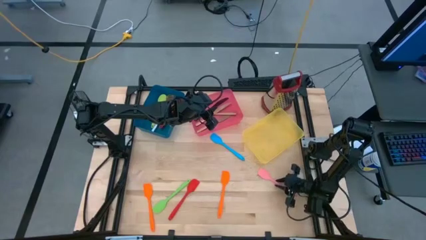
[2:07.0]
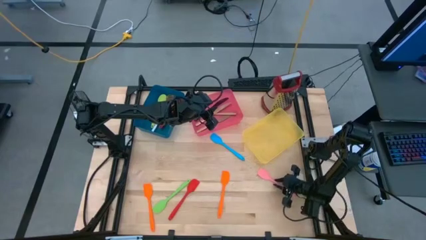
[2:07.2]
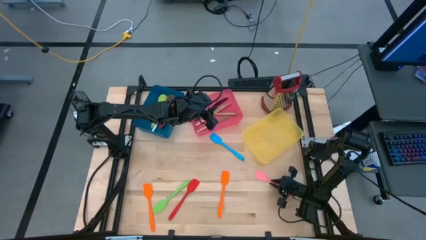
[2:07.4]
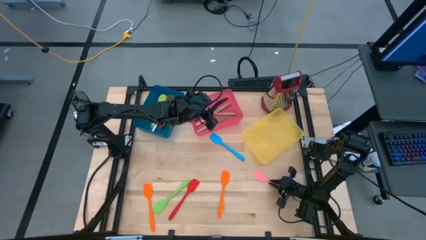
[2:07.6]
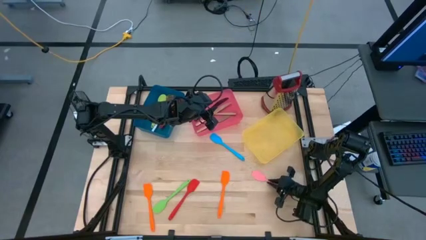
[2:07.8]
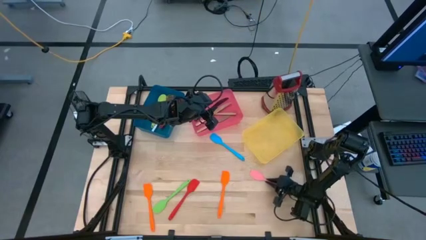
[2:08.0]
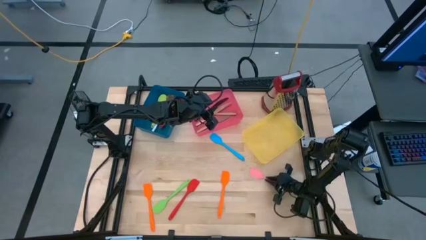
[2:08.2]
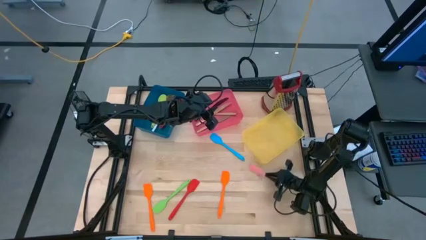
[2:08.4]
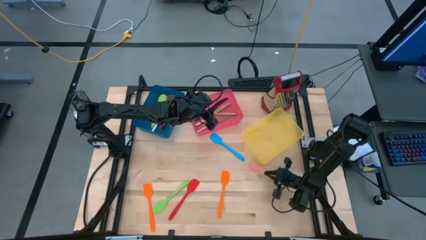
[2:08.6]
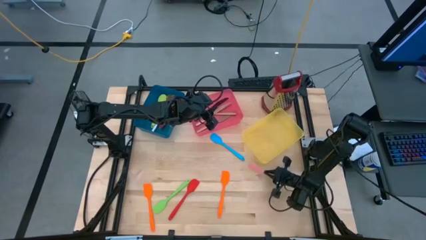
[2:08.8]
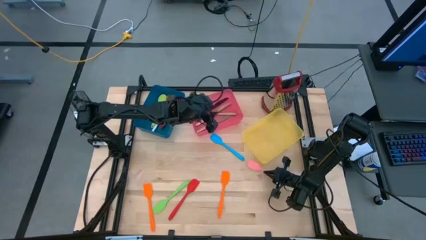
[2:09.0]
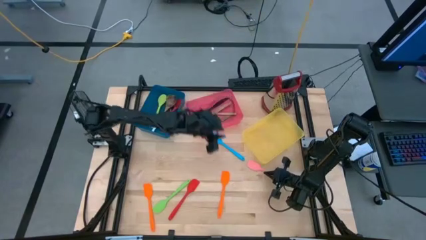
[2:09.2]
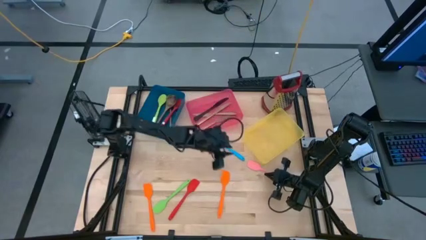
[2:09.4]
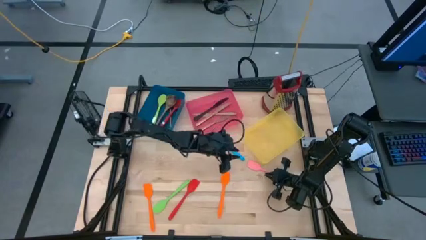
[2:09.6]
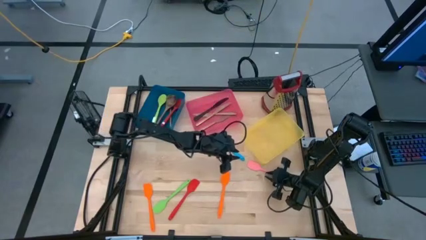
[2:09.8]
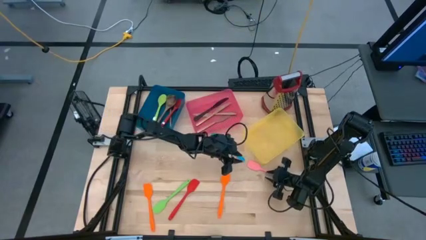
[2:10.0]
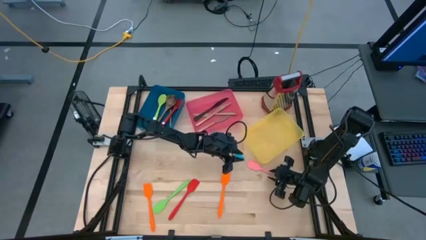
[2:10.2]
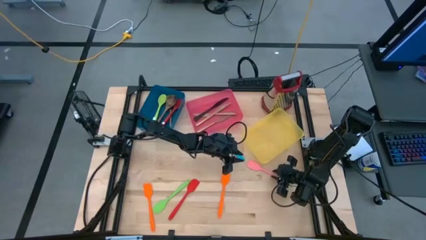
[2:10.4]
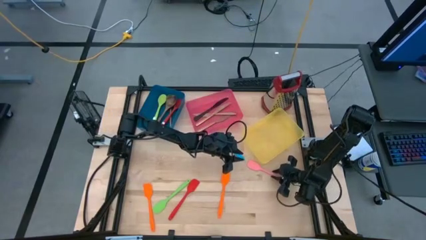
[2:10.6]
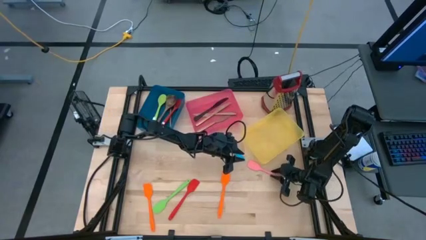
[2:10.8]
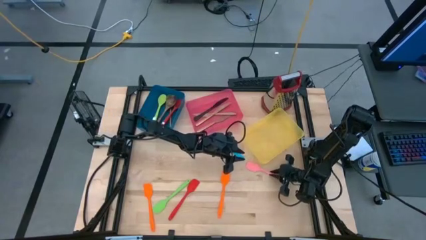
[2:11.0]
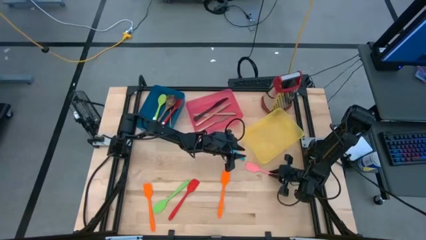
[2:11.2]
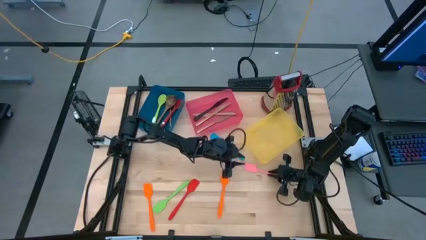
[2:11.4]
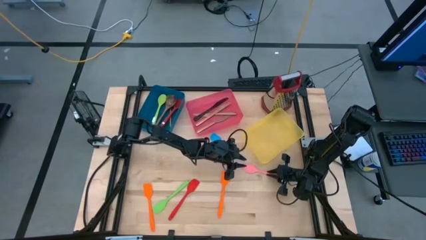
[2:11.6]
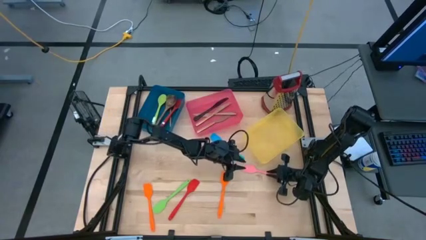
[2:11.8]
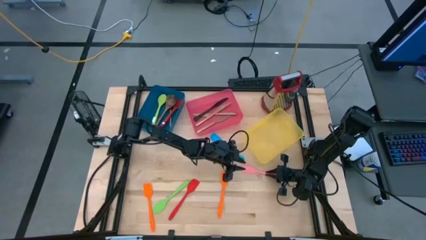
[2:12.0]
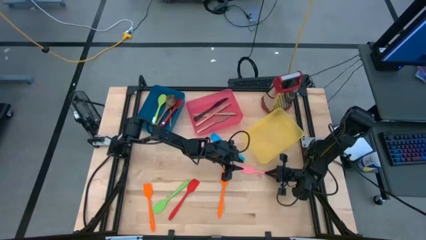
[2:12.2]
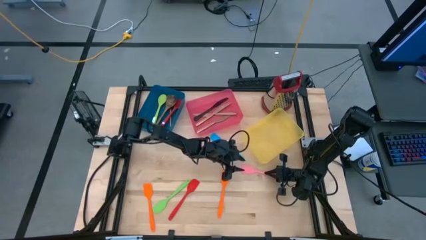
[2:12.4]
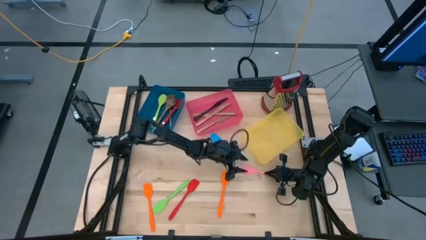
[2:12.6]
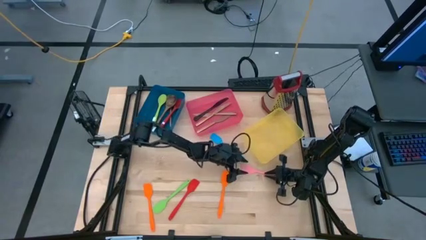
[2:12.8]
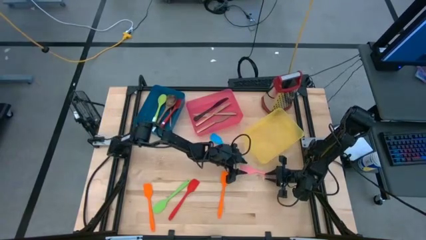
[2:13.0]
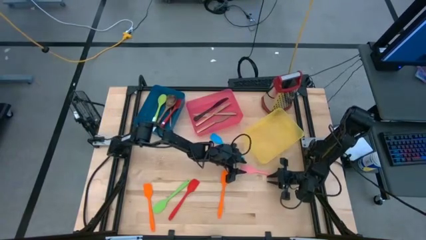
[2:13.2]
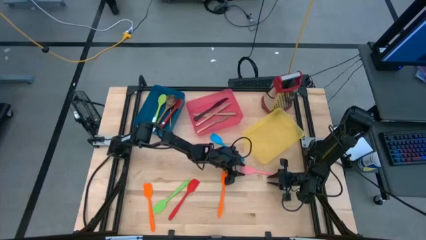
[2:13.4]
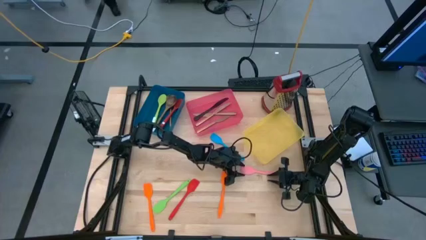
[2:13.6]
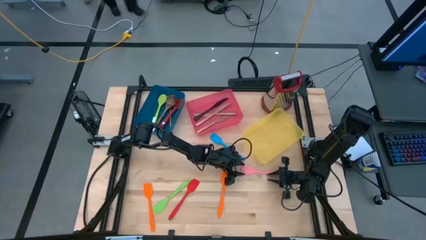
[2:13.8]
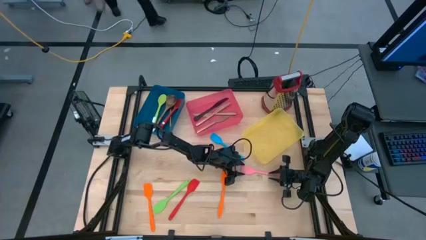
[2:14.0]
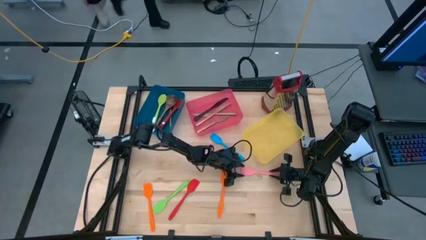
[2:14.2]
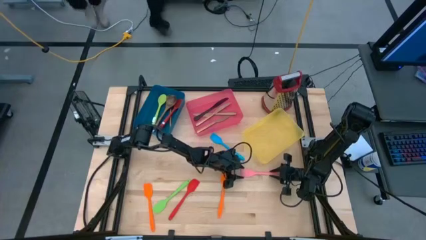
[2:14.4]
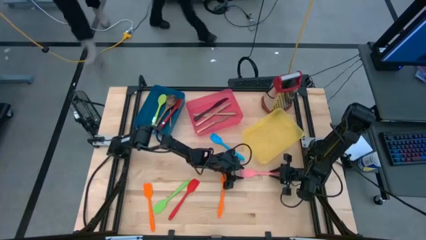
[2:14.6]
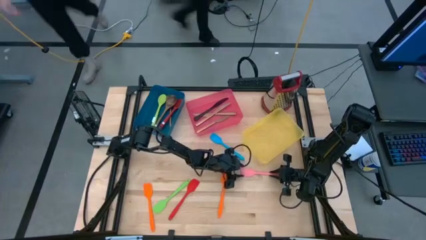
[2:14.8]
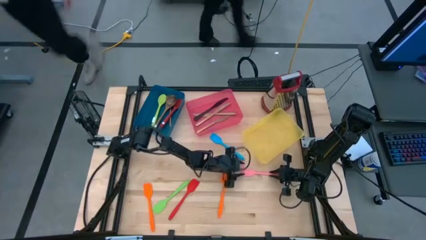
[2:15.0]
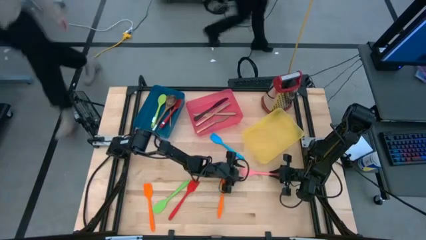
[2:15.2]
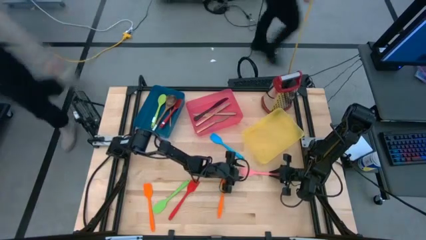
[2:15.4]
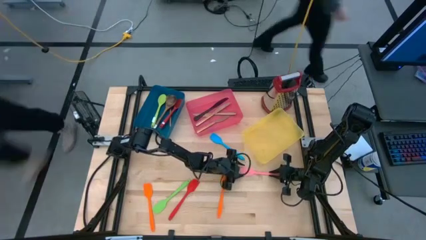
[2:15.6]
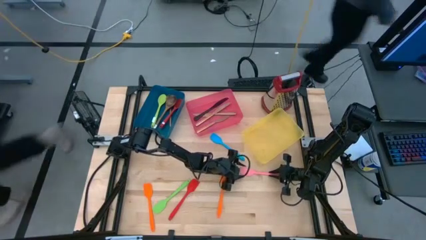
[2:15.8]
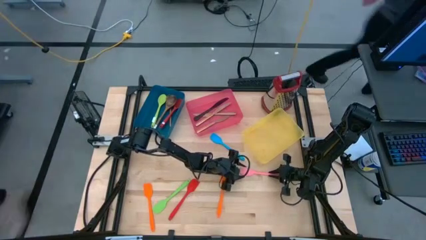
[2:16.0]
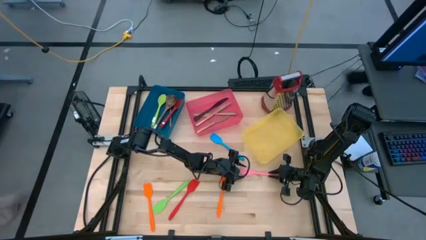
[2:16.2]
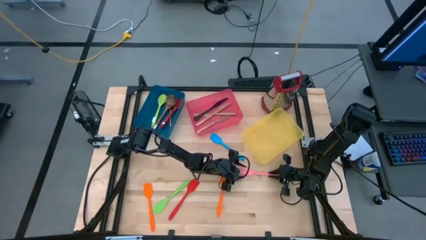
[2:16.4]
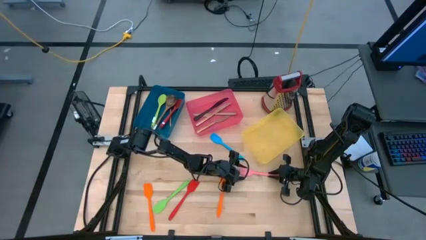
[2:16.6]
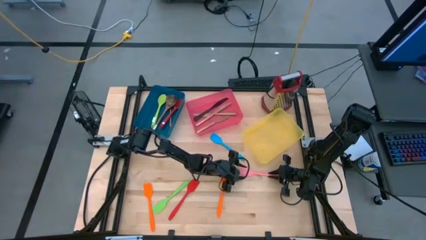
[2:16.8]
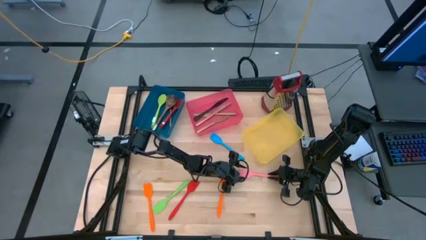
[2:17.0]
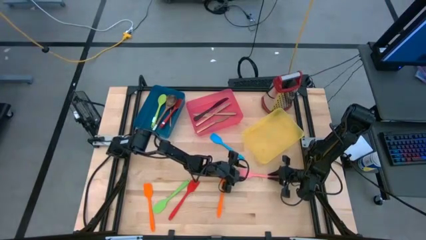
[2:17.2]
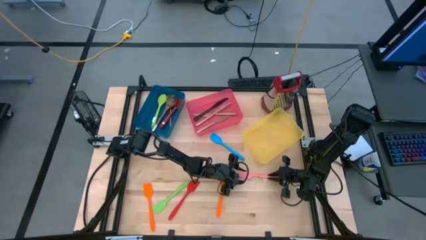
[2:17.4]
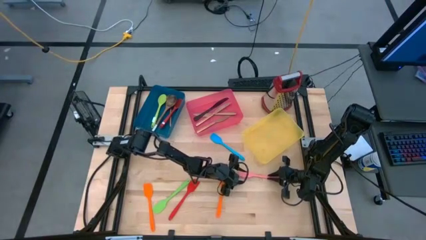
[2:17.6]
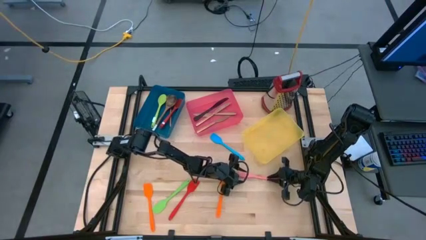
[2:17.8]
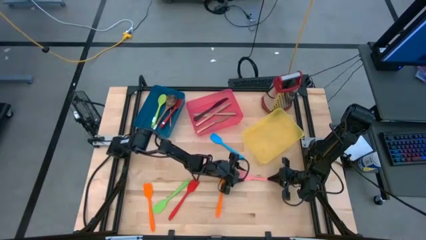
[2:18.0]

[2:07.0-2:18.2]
Task: Pick & Place Kitchen Items
Put the pink spatula into the yellow bin

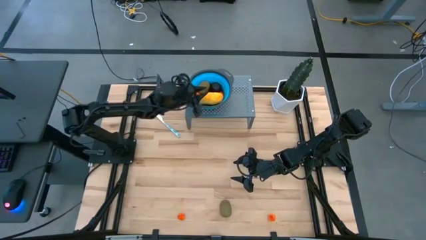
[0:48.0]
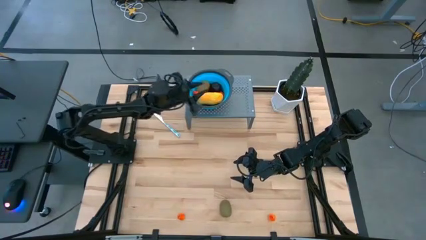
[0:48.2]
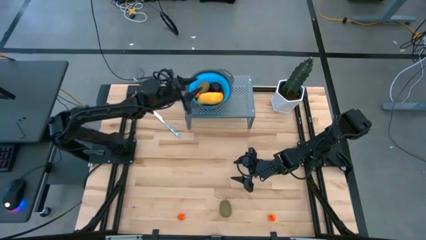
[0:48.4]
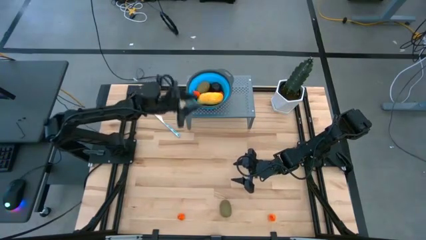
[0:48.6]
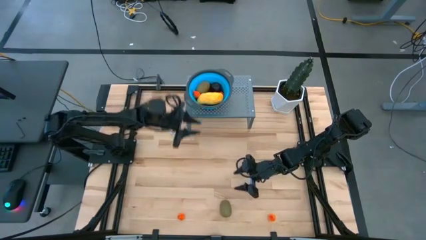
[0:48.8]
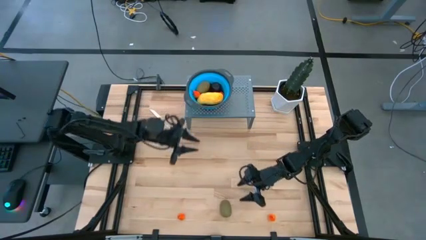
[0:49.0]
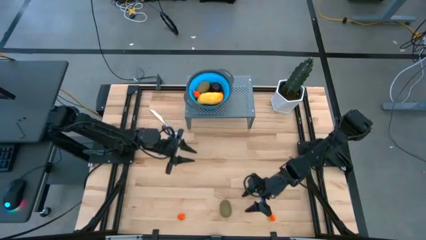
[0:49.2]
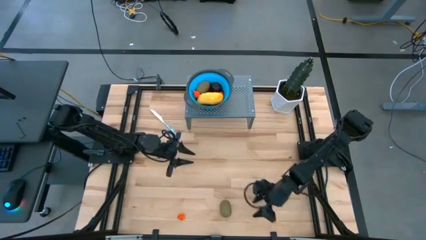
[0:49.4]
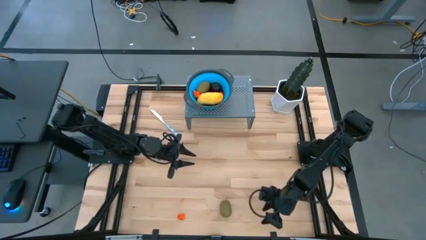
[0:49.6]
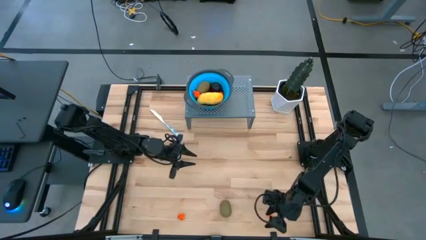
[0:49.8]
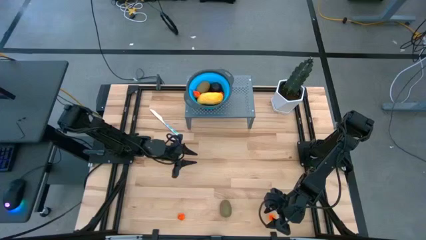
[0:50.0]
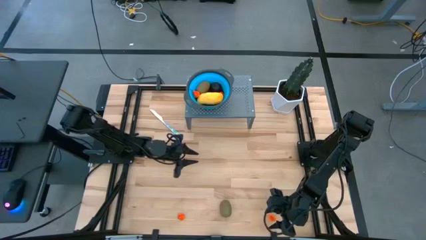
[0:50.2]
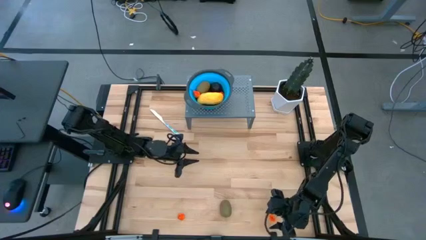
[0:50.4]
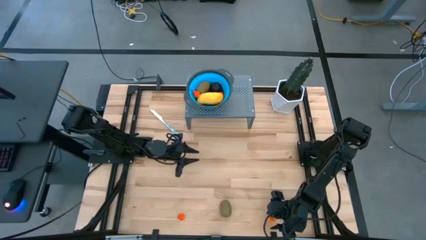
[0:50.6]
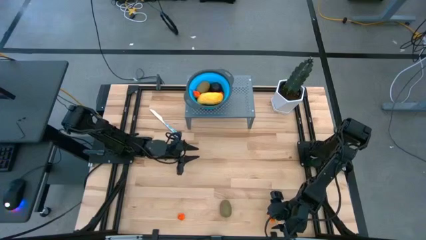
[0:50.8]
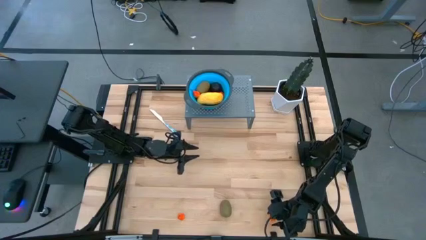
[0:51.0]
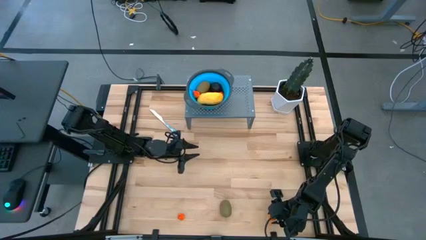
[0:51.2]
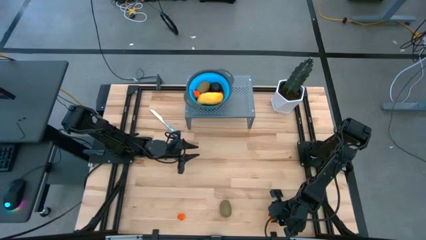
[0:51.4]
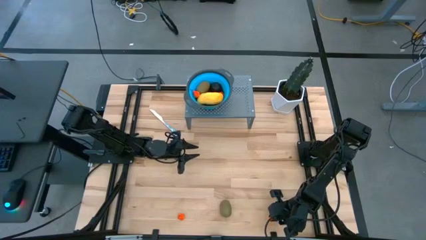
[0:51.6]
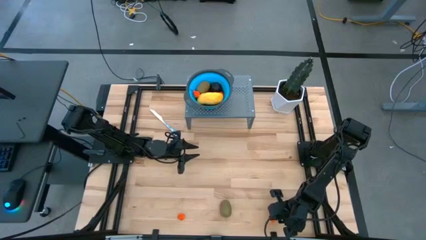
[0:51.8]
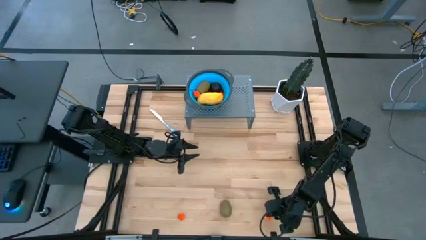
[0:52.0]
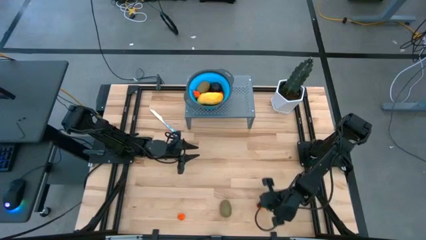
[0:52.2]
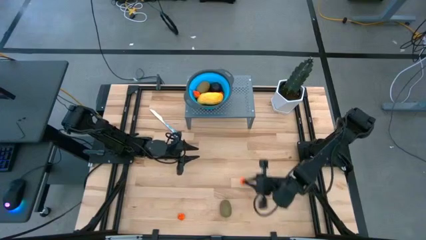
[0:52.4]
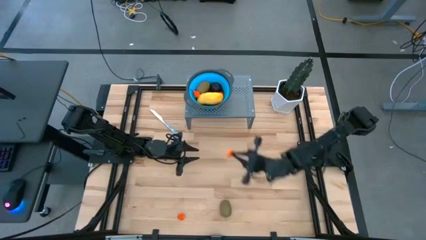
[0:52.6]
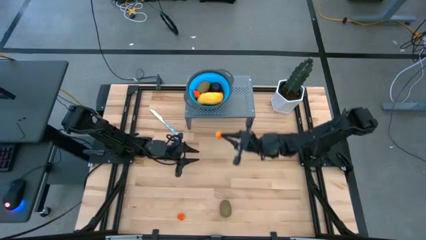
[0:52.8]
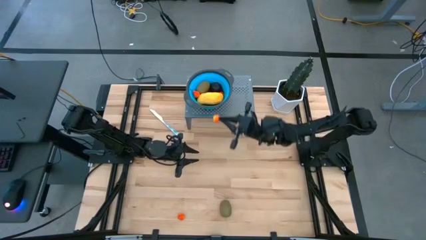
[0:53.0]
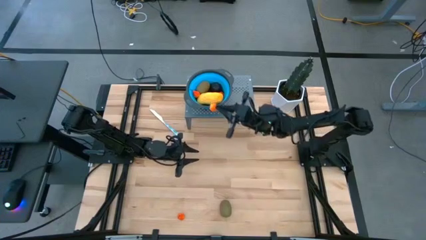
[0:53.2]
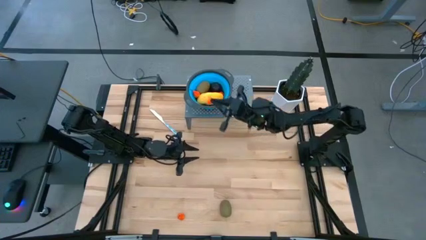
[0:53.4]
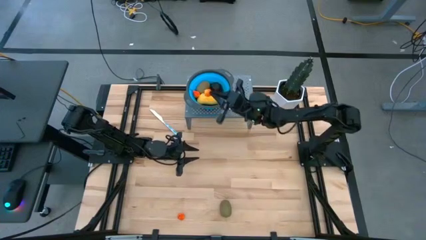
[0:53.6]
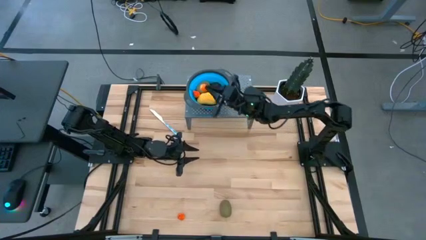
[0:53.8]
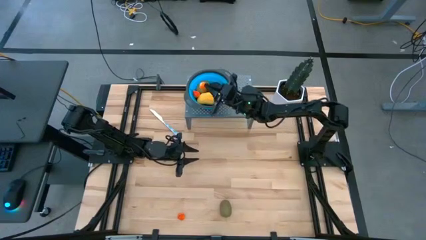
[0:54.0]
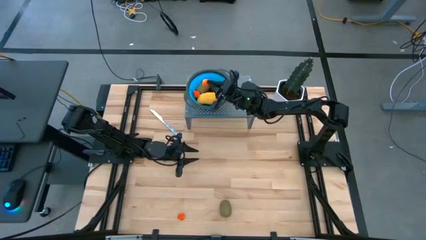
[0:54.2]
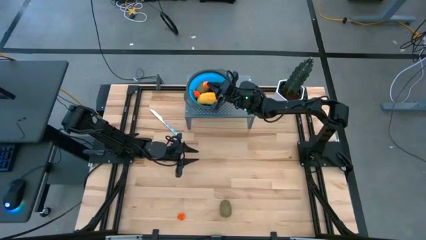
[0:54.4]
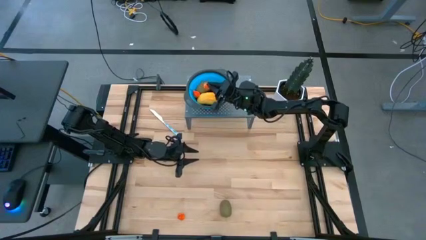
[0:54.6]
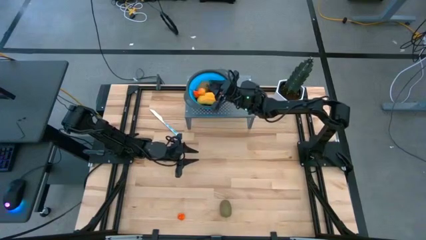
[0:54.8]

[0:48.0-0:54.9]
Task: Pick & Place Fruit
Put the orange pear into the blue strainer bowl
